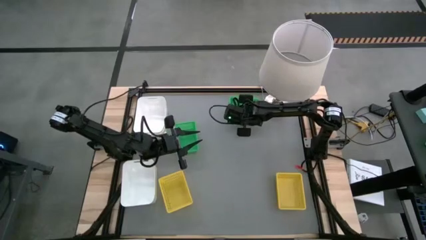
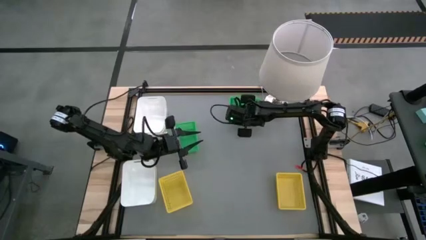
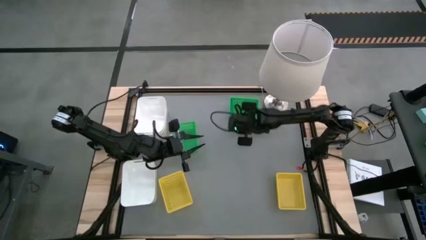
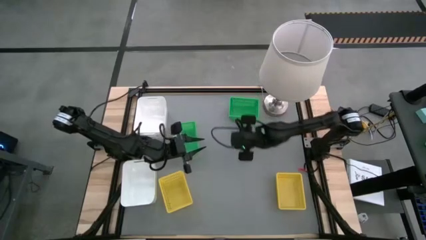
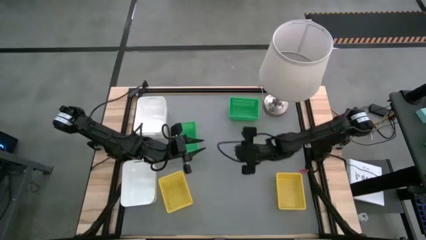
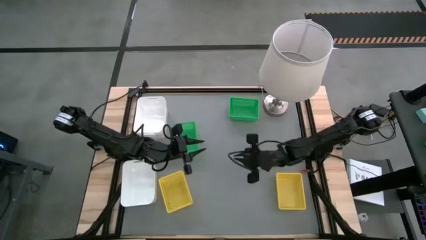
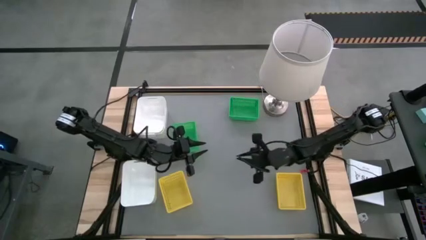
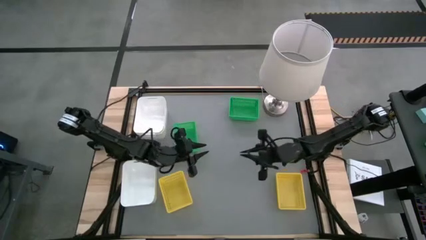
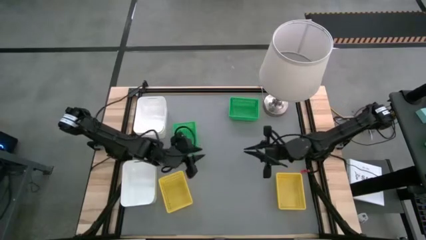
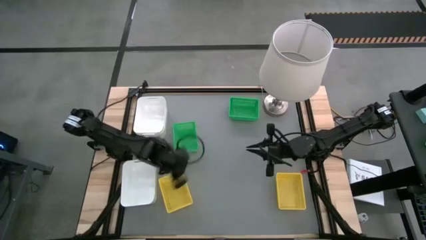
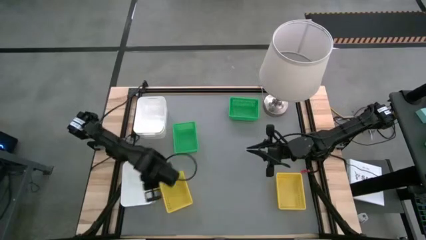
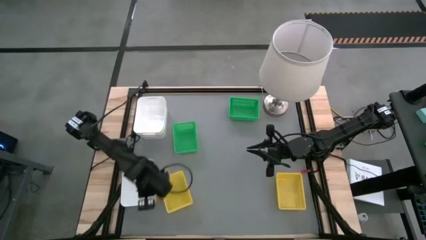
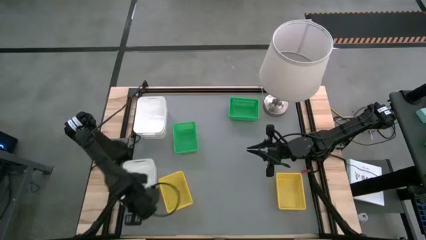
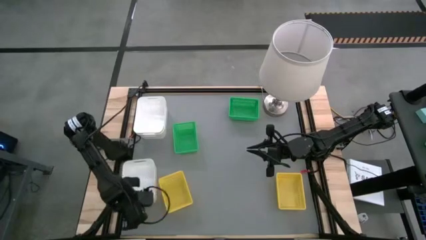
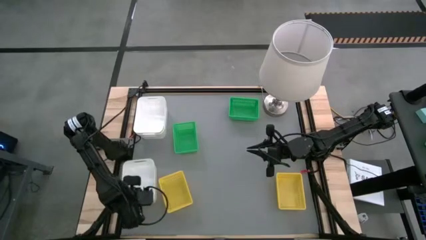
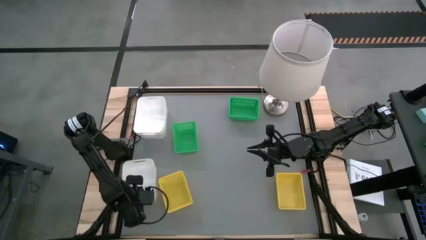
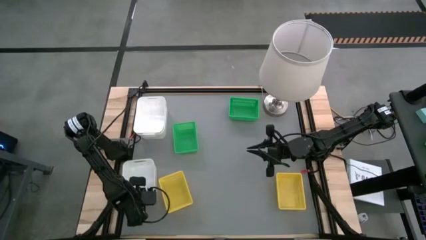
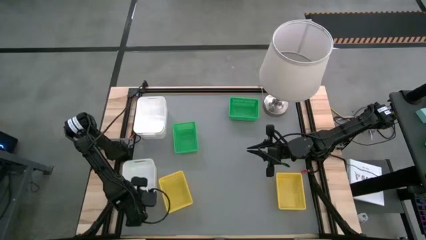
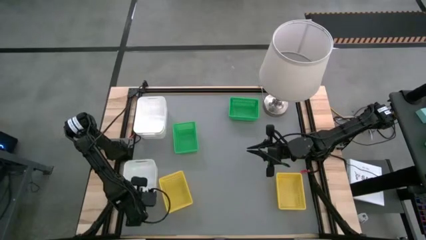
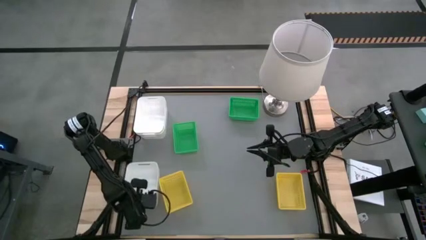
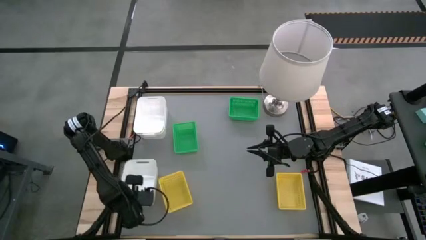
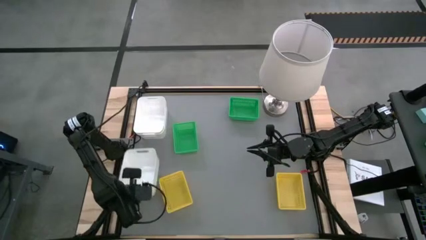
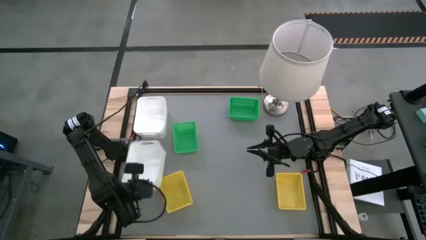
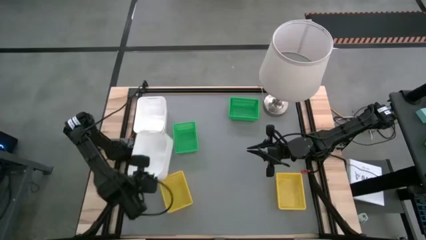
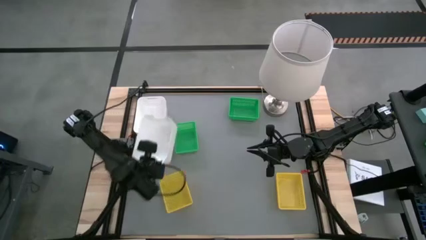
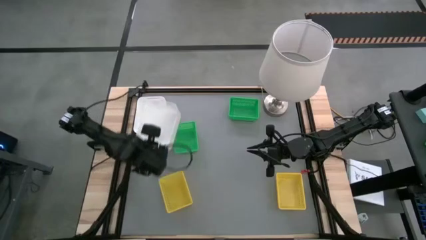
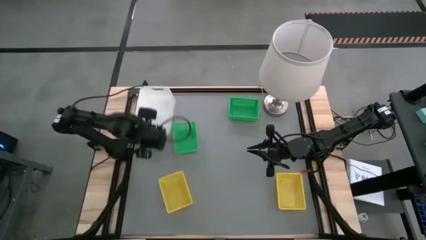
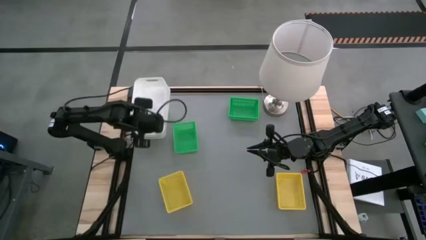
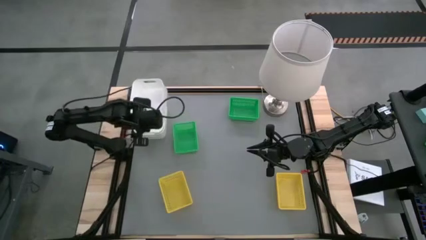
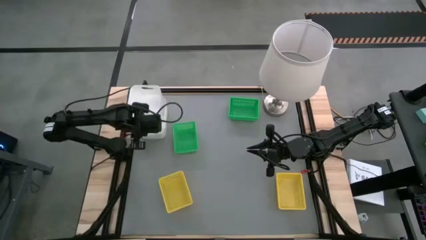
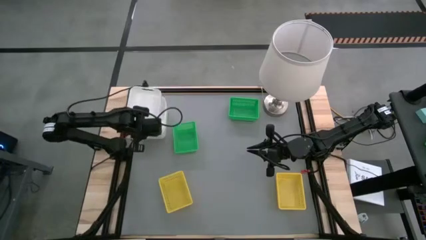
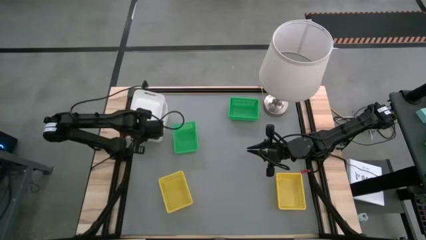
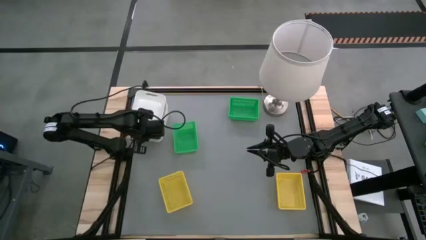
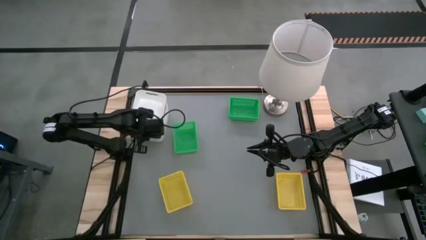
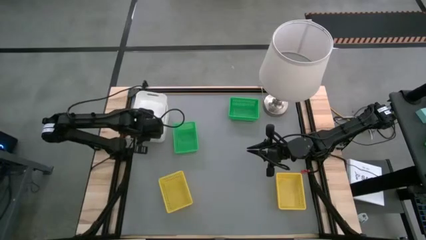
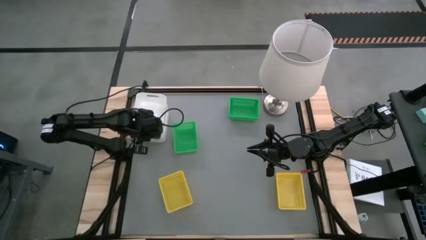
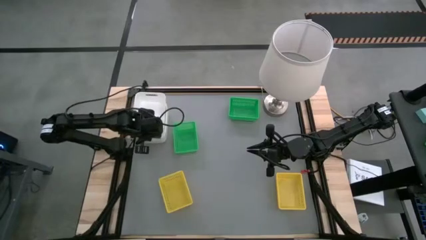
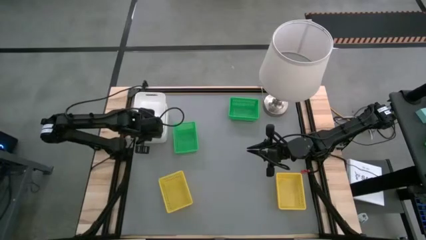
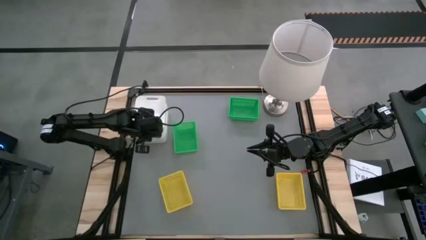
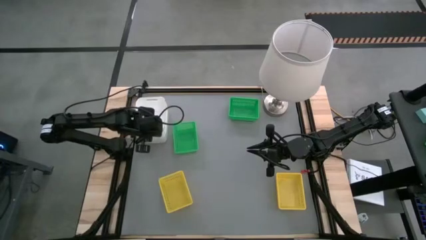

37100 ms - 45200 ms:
Stack the bottom white bin on the top white bins

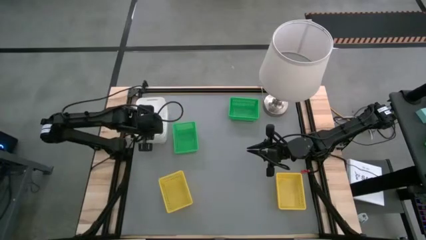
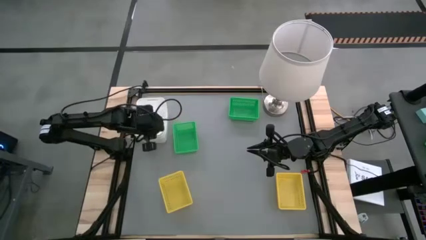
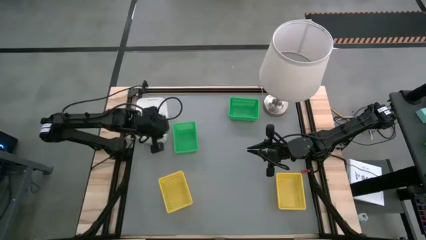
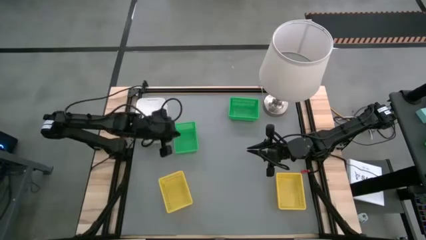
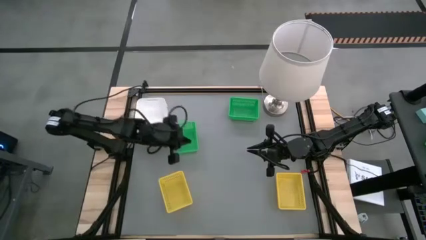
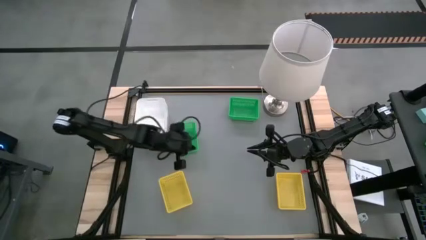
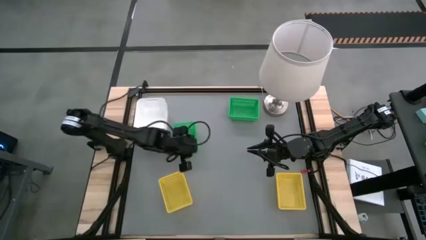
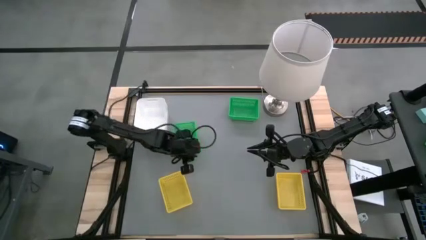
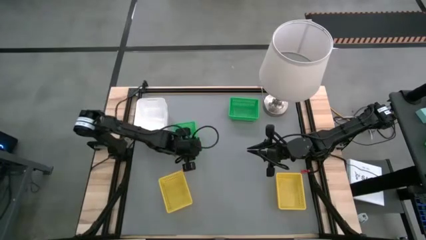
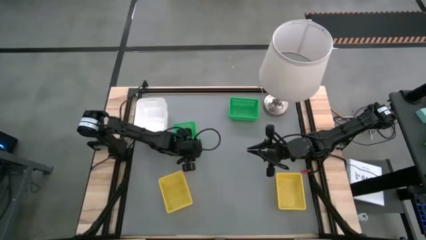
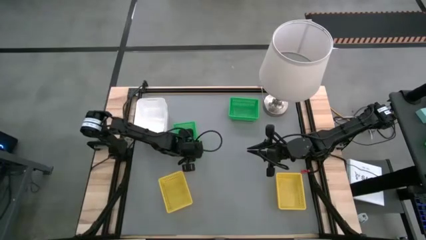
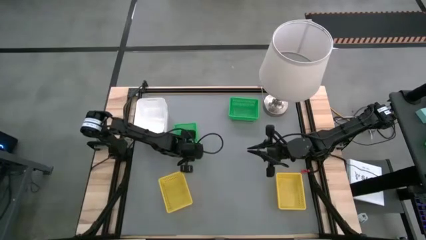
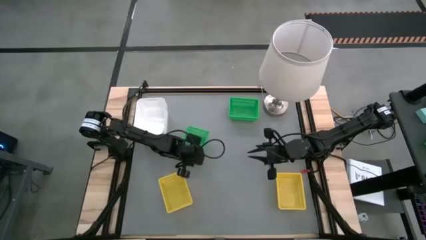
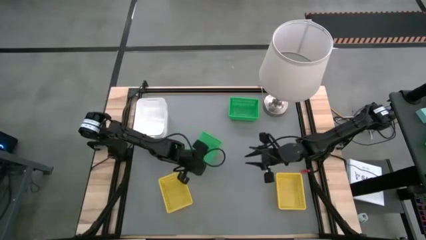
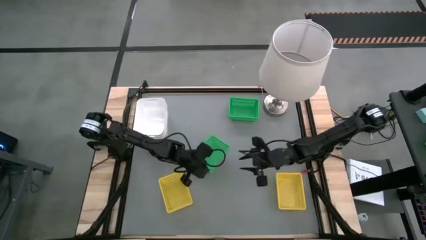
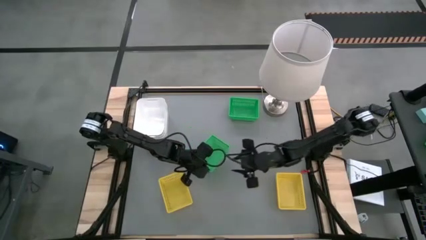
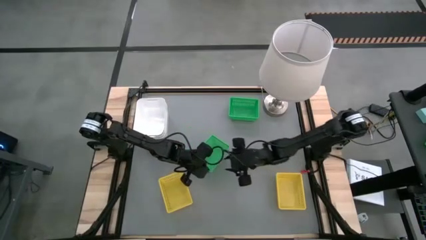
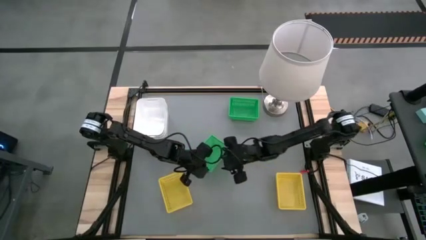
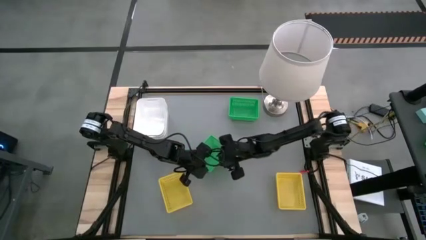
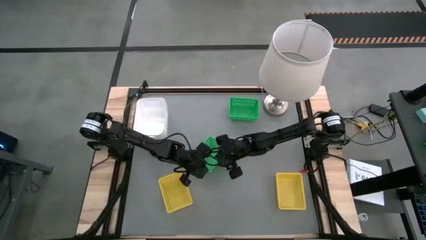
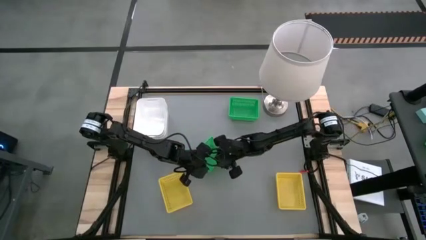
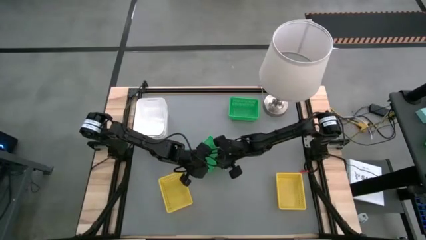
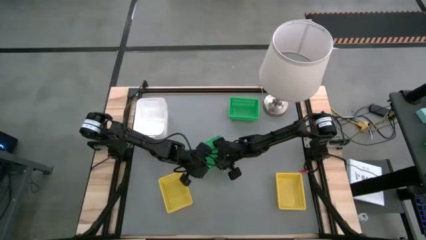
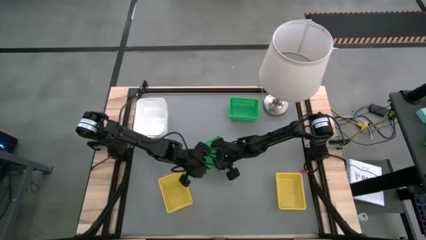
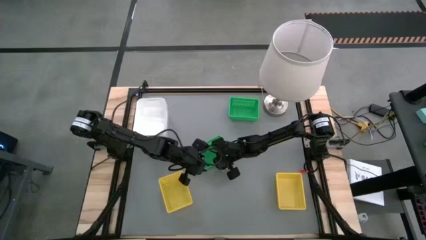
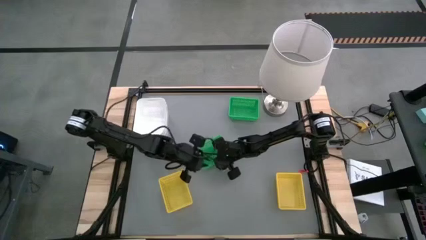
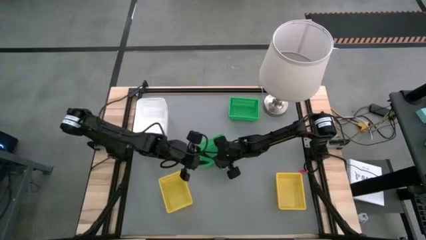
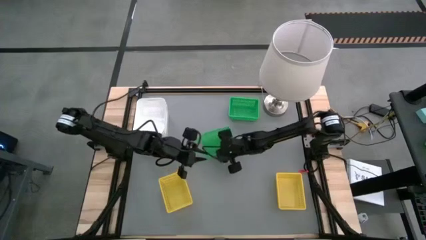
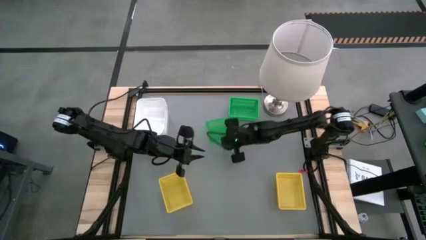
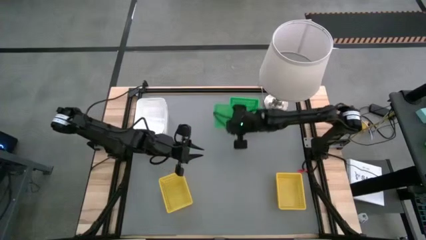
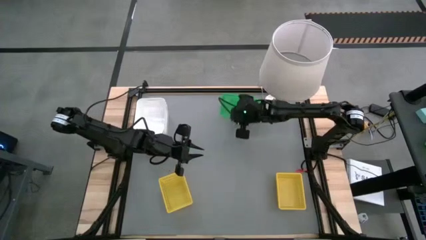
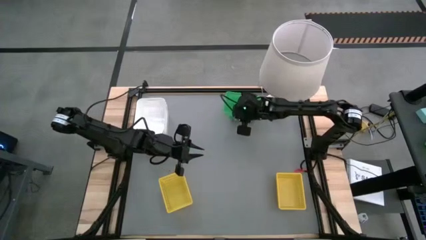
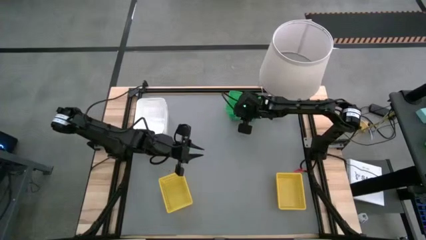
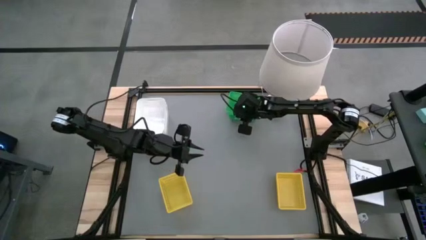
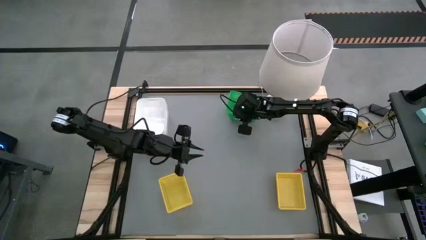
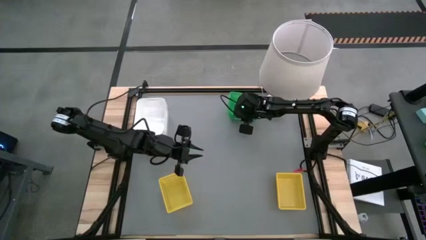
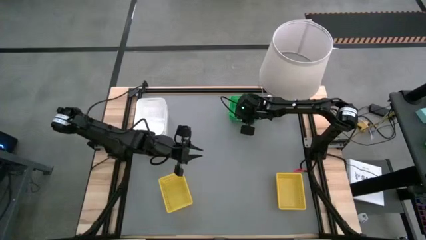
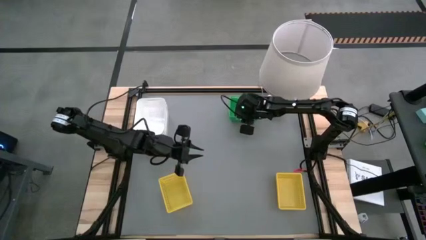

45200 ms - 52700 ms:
Stack the bottom green bin on the top green bins
